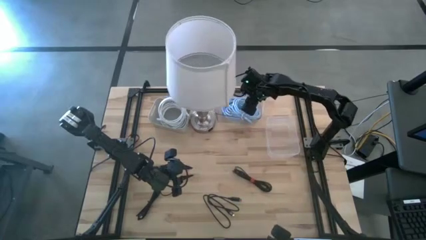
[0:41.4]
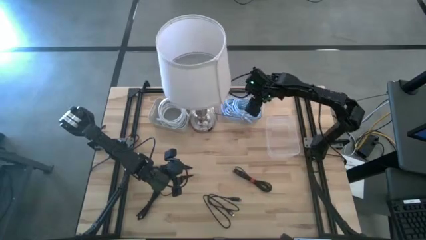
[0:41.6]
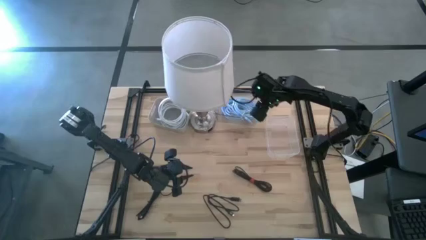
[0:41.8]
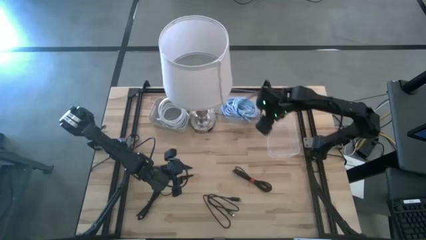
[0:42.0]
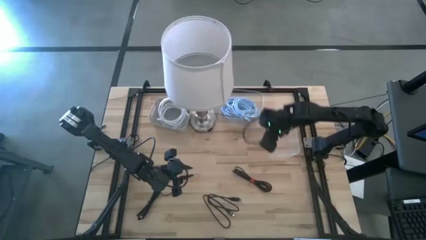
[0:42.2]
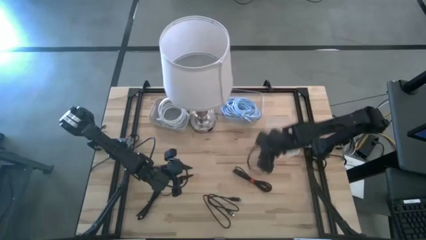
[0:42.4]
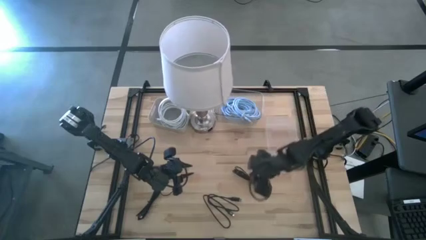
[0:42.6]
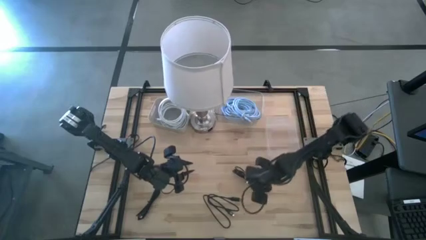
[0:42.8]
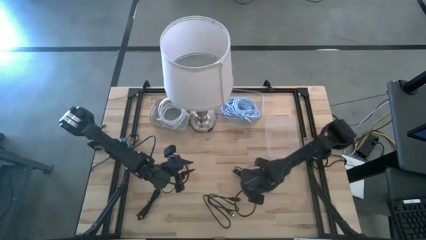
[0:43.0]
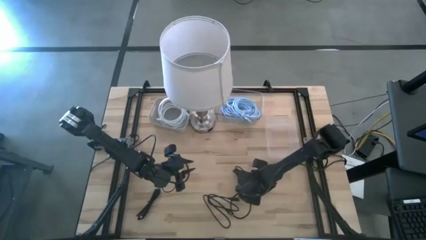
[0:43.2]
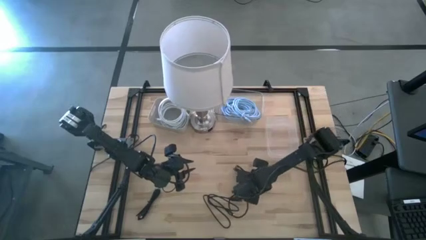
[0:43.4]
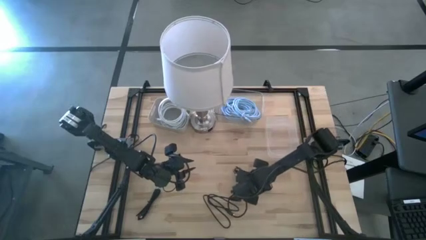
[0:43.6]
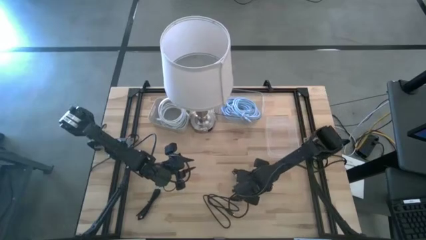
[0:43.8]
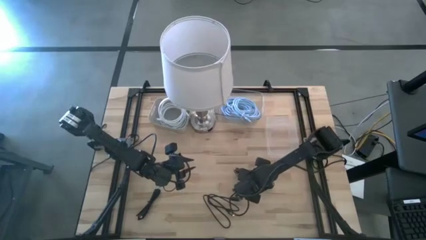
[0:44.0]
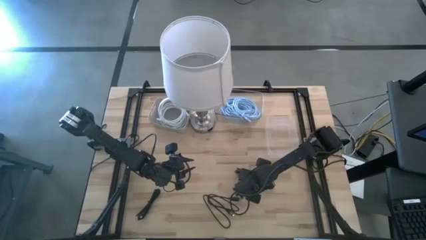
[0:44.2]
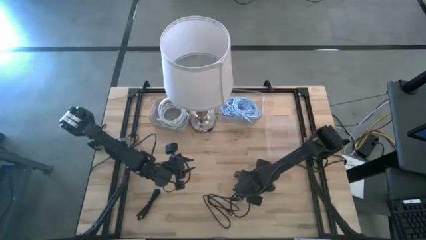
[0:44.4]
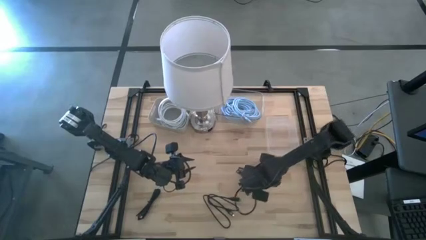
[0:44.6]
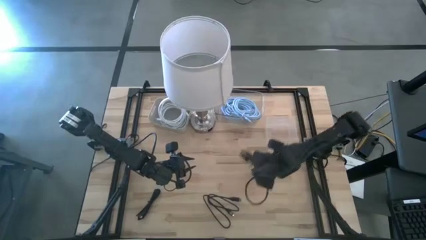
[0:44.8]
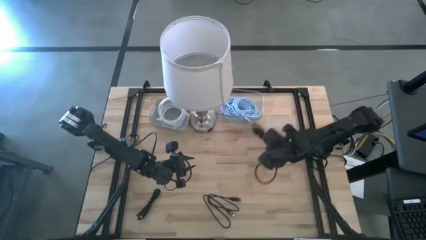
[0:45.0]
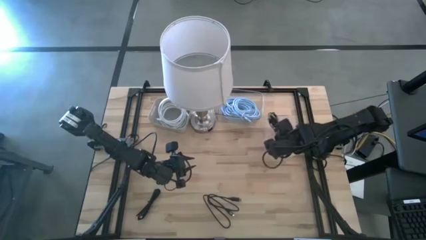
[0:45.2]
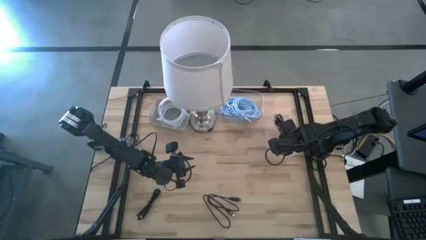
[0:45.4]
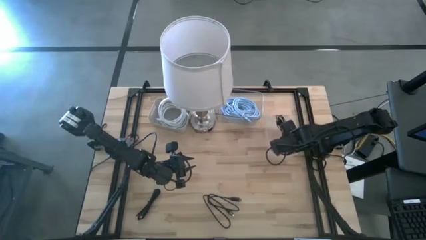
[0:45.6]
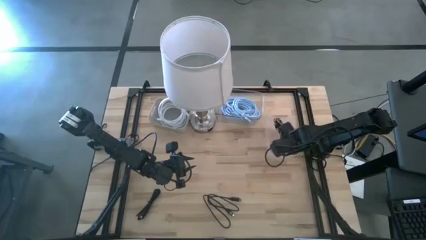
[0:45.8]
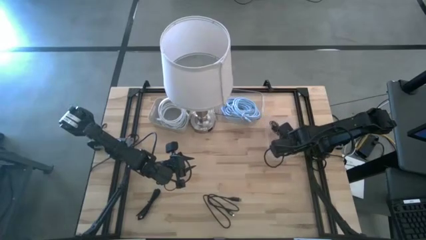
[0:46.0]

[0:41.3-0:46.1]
Task: Pick & Place USB Port
Put the right black USB cable into the right transparent bin

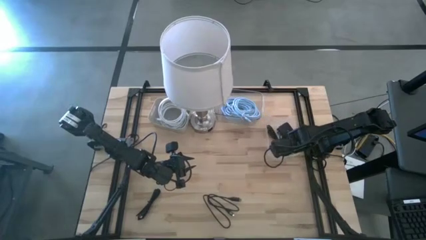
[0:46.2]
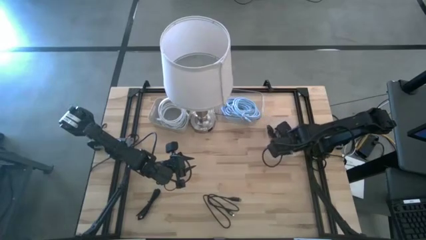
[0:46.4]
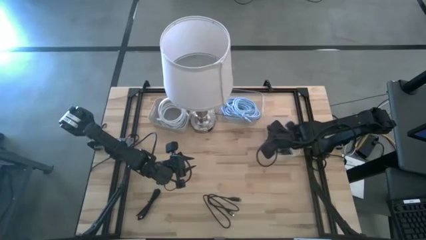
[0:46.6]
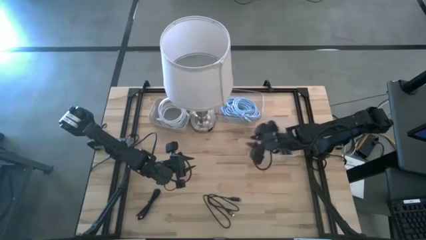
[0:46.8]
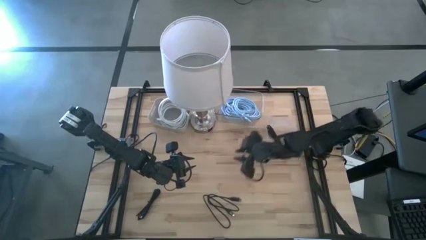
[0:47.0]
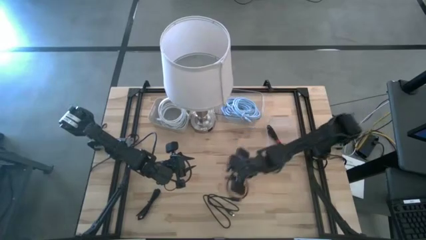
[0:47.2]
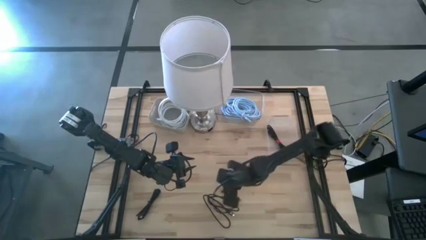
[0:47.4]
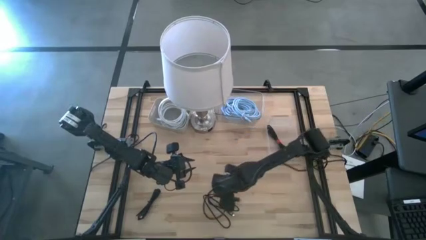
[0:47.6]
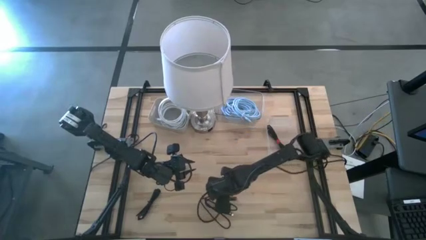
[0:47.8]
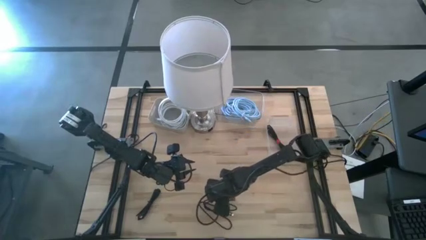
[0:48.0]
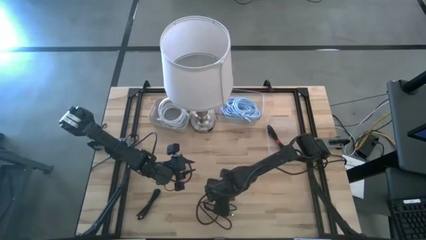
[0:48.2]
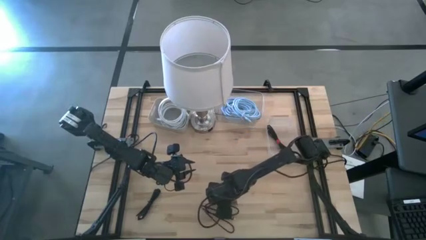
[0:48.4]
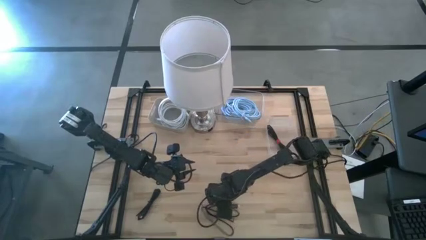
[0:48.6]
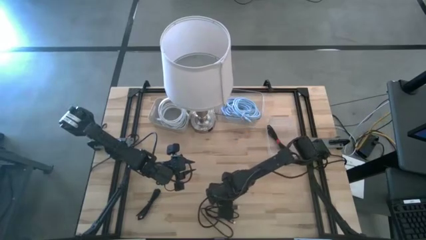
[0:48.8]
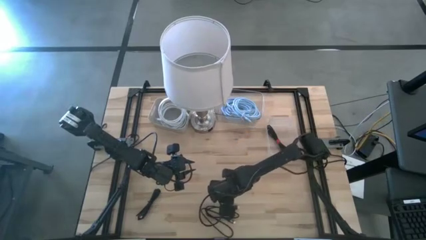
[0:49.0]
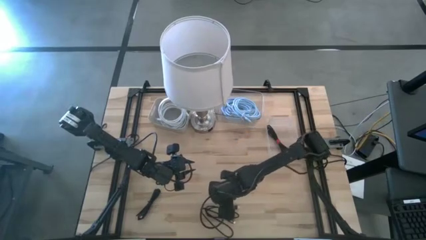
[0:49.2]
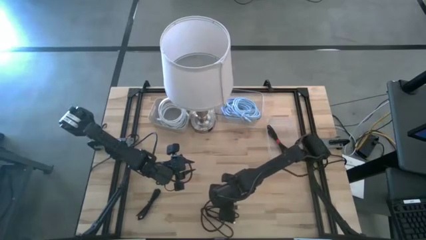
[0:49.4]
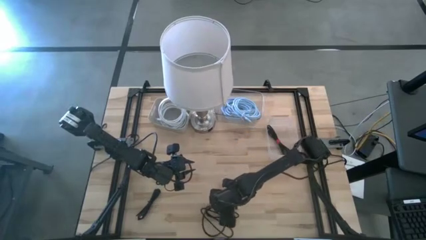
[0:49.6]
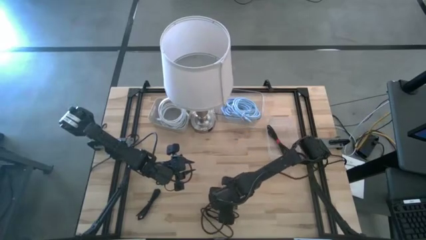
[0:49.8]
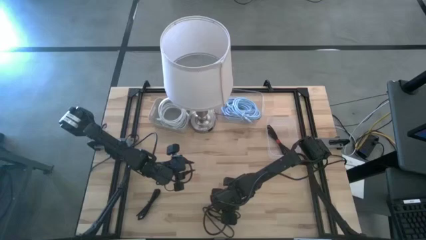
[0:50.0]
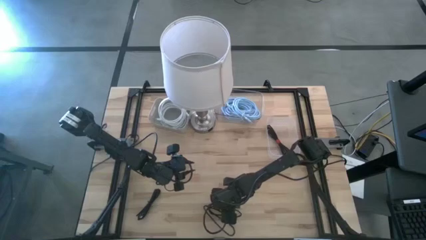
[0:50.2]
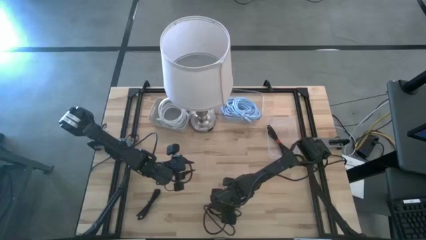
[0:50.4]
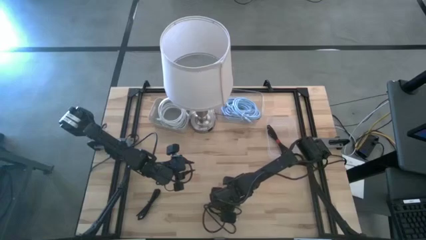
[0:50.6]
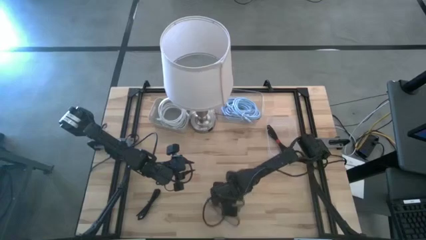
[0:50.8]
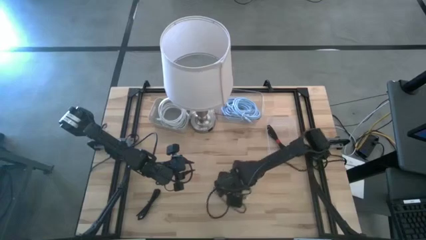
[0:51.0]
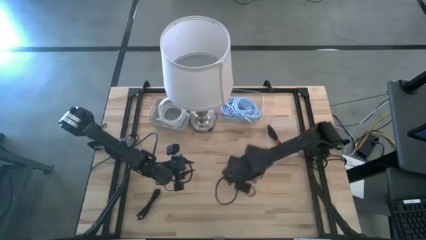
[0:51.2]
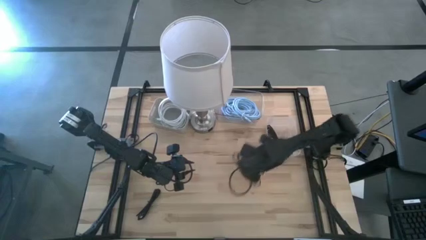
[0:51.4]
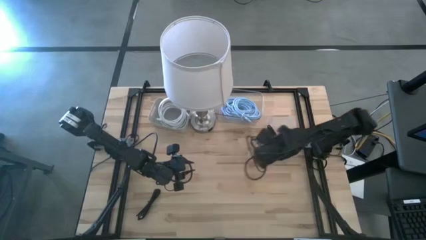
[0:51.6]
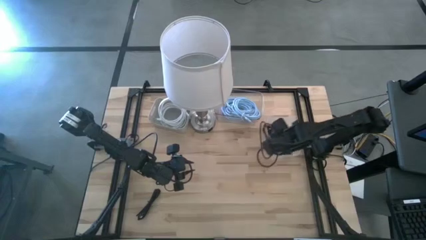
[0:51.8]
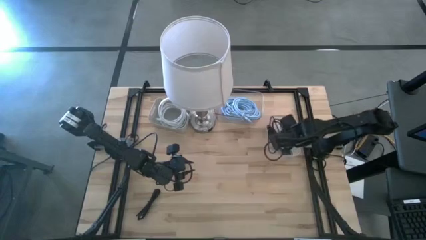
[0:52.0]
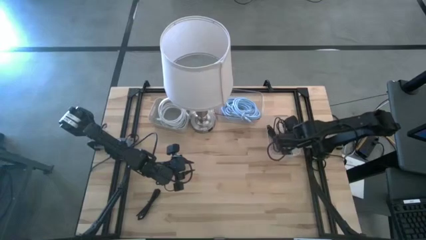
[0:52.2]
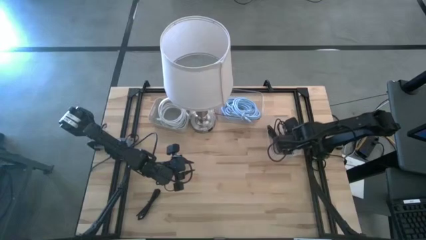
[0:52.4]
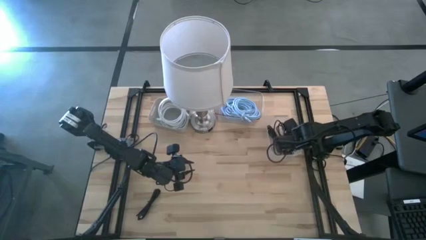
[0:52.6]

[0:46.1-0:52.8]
Put the right black USB cable into the right transparent bin

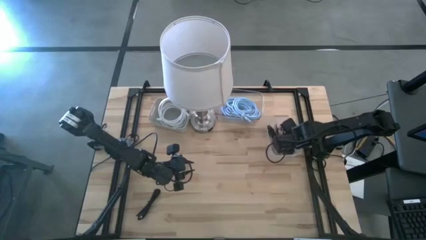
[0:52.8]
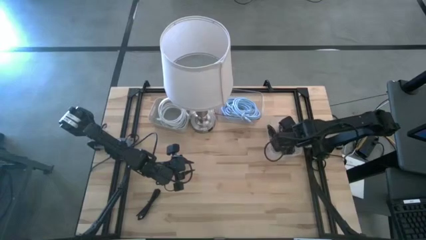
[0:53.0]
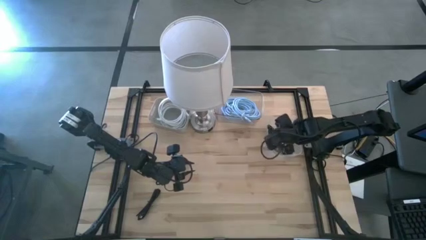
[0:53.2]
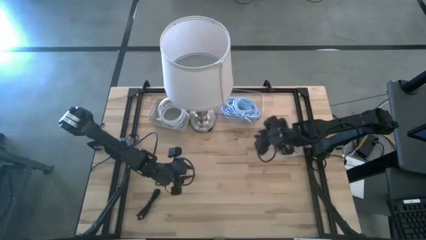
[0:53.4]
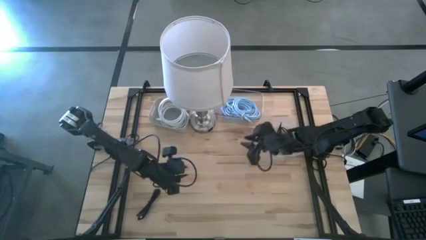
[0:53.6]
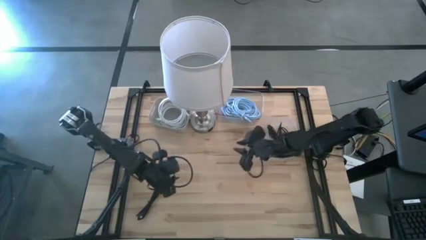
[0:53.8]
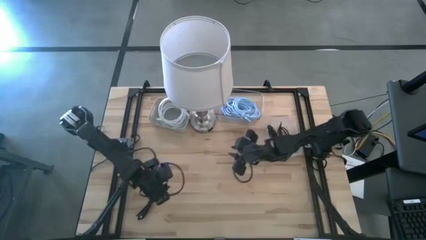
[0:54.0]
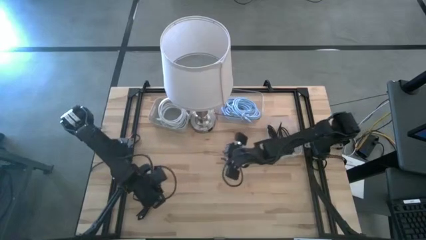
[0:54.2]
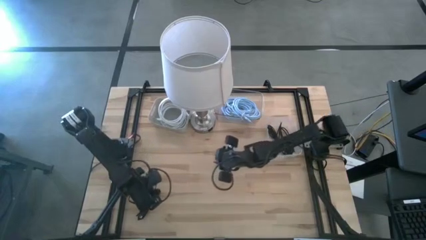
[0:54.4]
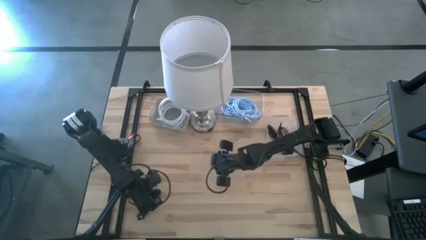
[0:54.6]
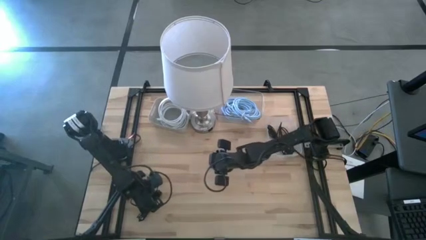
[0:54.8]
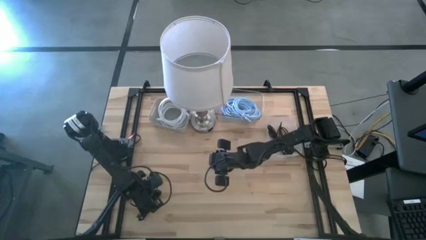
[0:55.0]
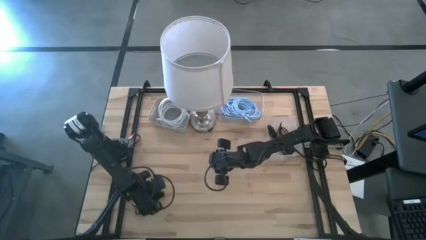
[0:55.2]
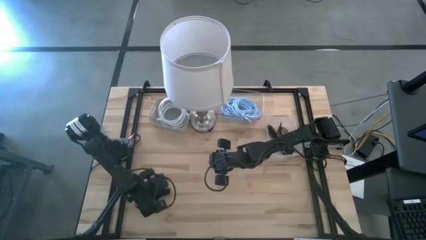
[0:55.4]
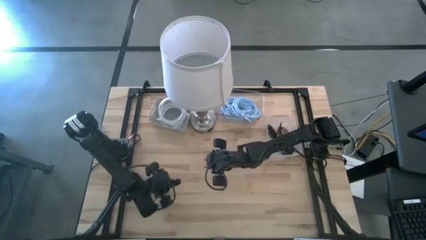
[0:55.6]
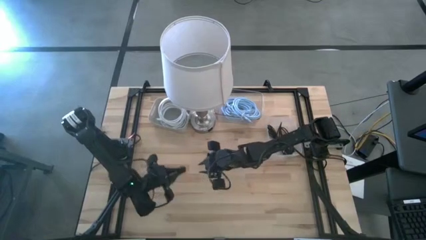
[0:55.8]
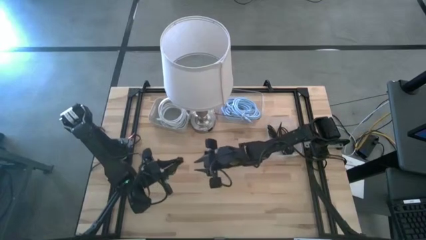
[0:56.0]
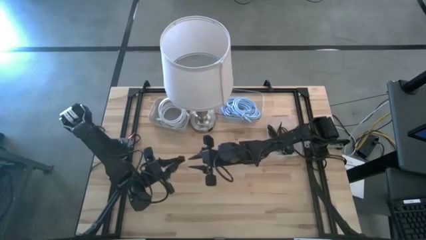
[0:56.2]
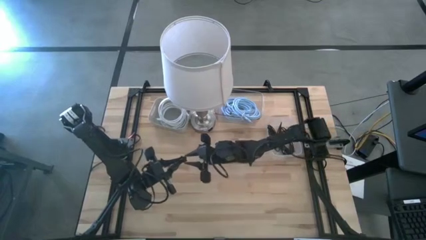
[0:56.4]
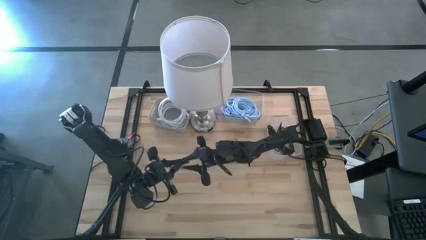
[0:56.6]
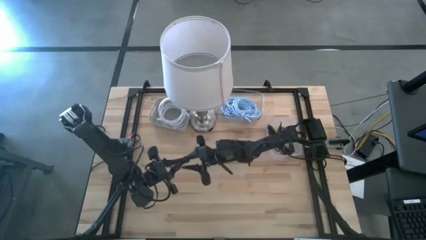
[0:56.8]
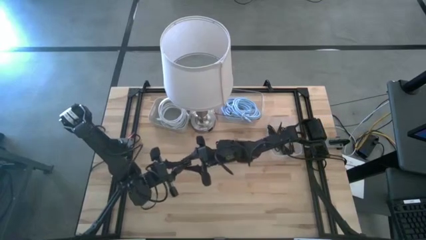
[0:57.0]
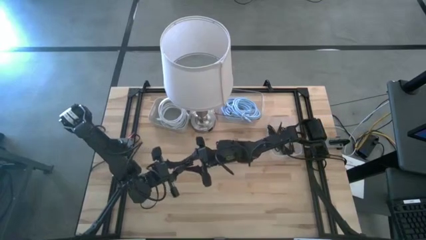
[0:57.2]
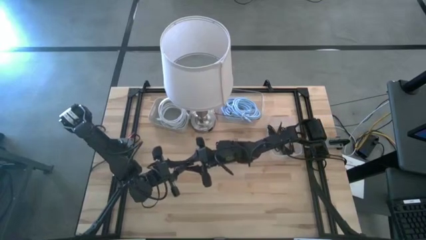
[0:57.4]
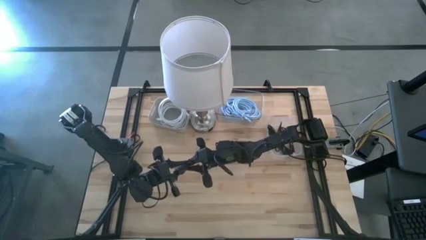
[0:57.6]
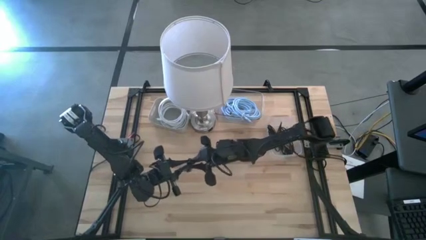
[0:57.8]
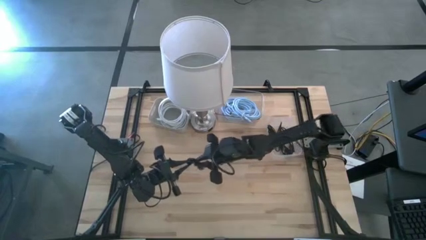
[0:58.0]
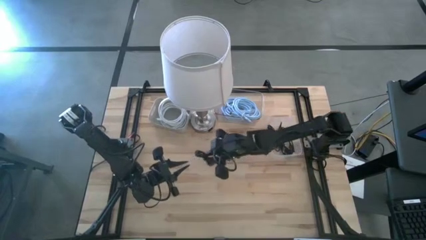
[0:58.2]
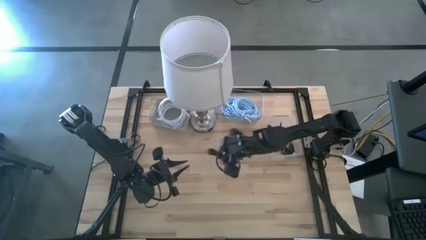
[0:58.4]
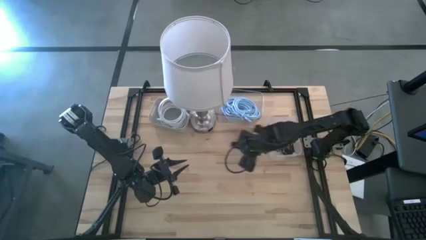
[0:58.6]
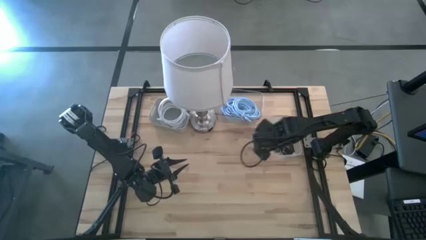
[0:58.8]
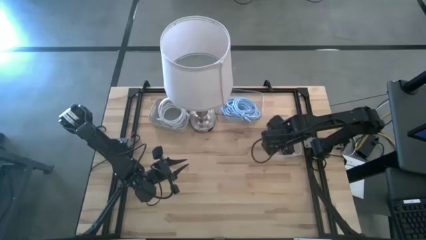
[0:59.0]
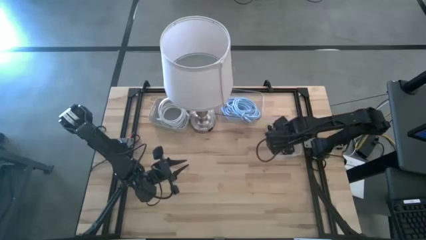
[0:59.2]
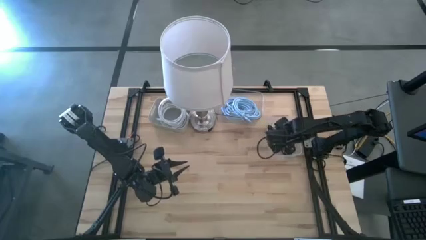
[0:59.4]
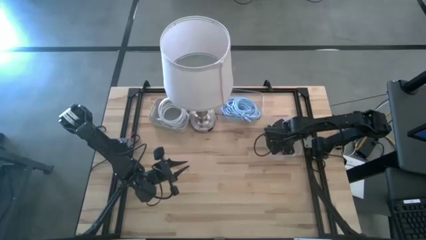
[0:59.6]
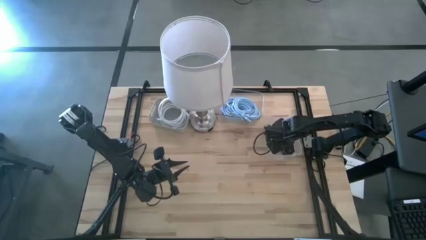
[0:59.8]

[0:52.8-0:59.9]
Put the black USB cable into the right transparent bin
